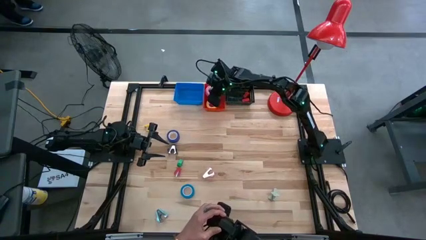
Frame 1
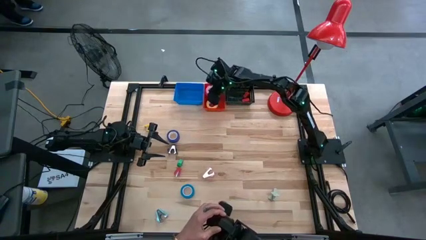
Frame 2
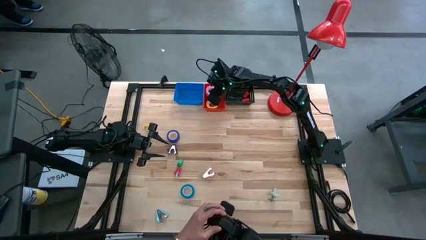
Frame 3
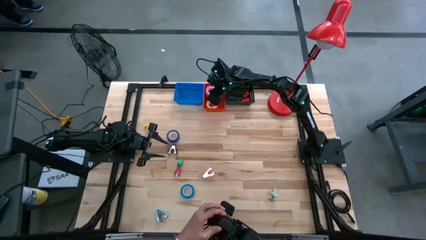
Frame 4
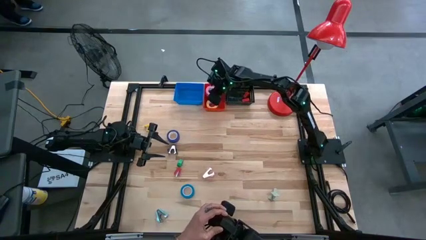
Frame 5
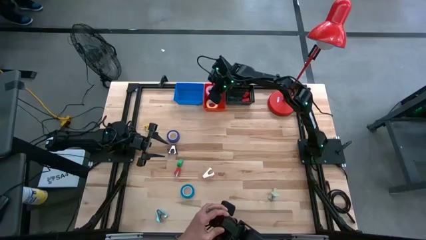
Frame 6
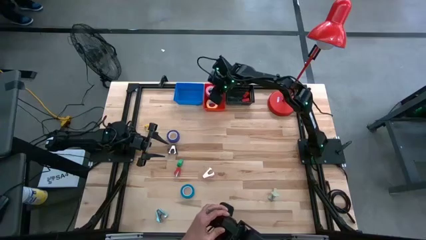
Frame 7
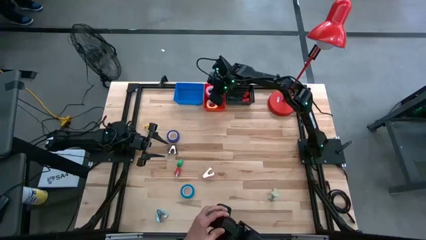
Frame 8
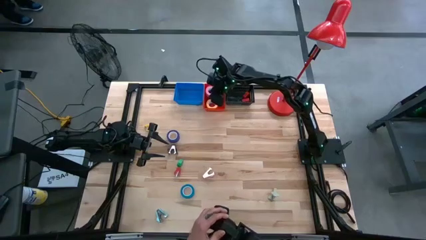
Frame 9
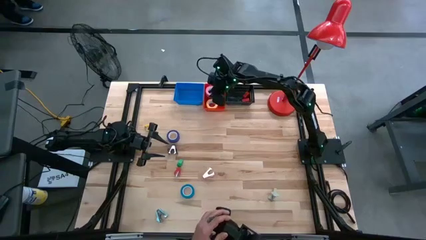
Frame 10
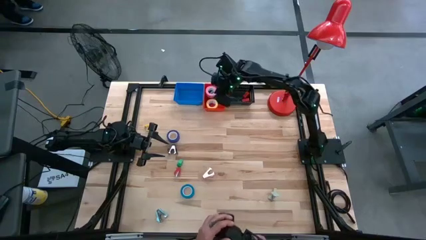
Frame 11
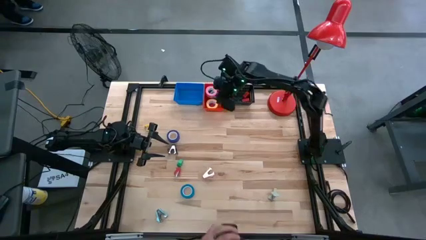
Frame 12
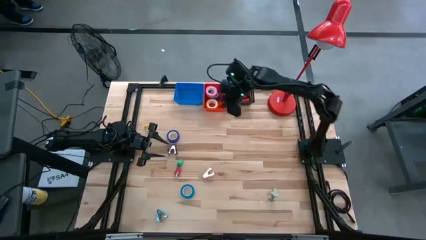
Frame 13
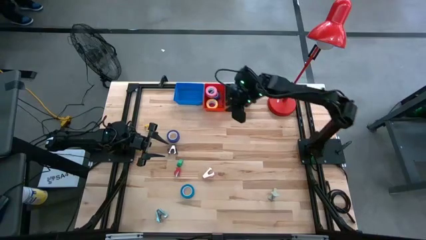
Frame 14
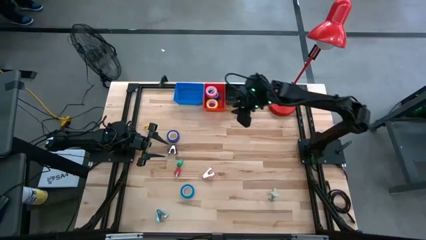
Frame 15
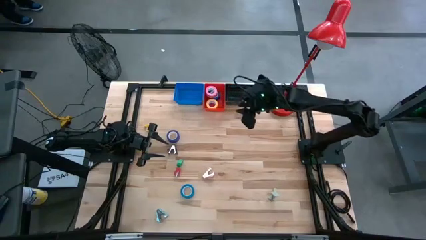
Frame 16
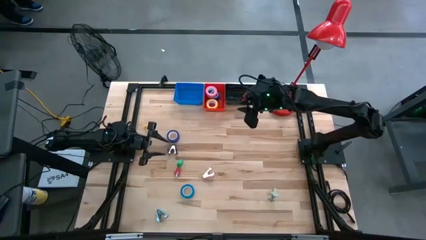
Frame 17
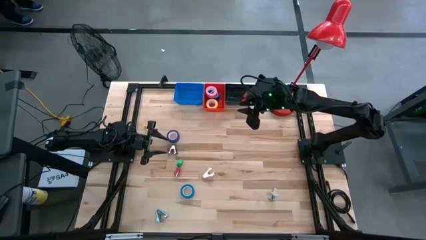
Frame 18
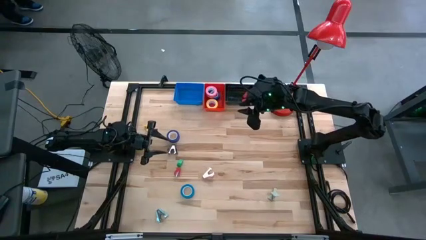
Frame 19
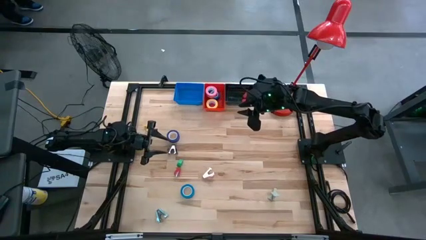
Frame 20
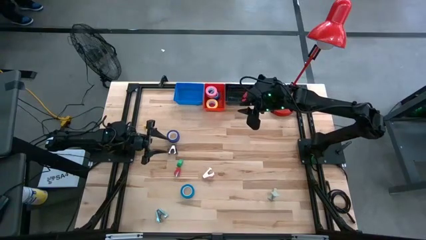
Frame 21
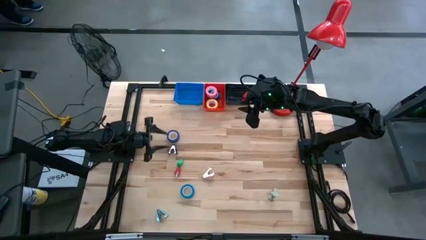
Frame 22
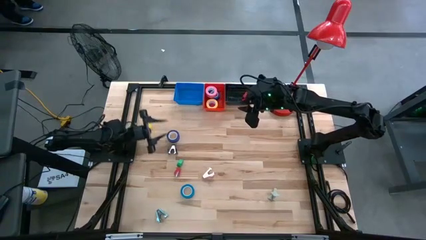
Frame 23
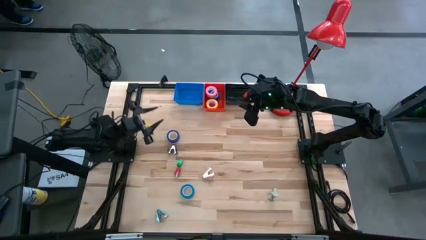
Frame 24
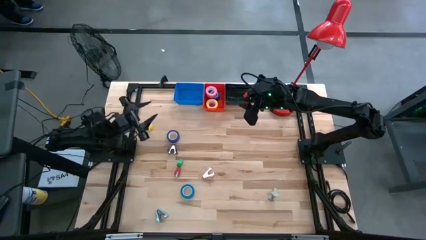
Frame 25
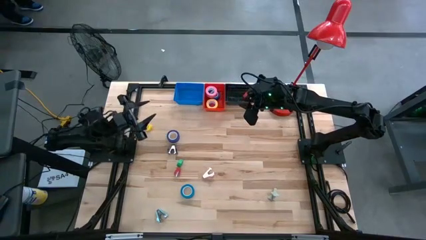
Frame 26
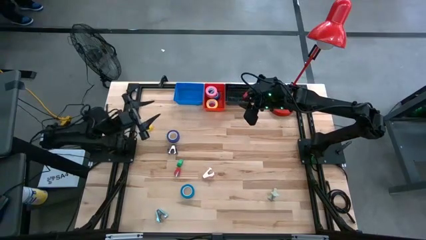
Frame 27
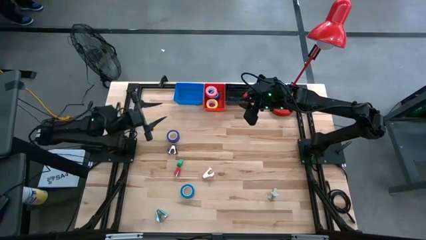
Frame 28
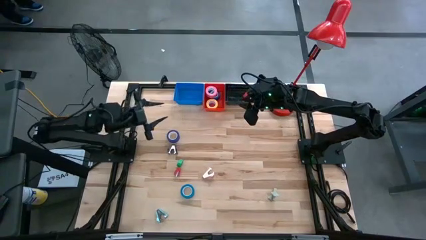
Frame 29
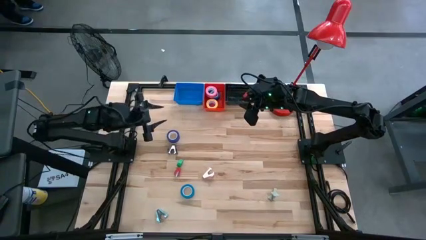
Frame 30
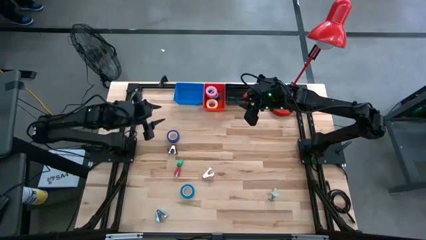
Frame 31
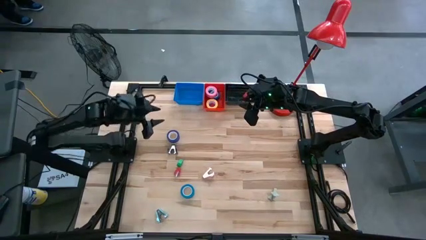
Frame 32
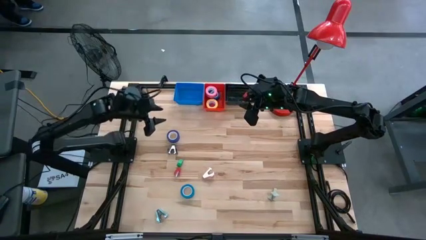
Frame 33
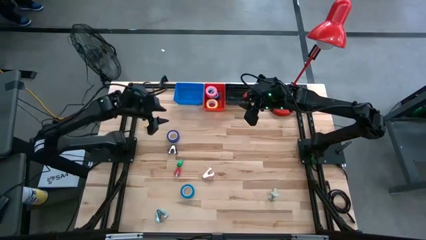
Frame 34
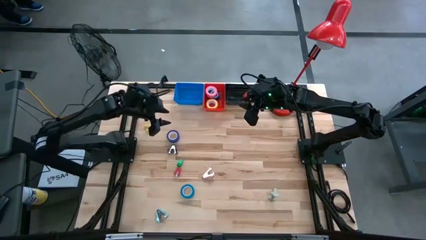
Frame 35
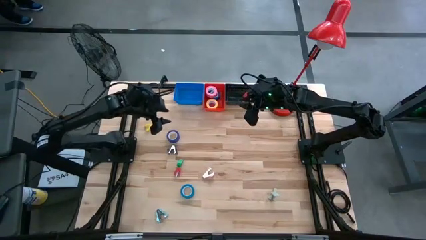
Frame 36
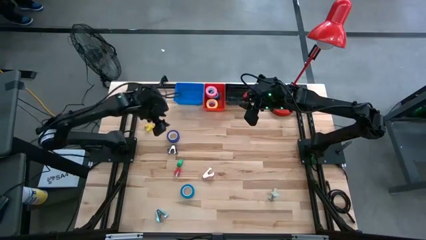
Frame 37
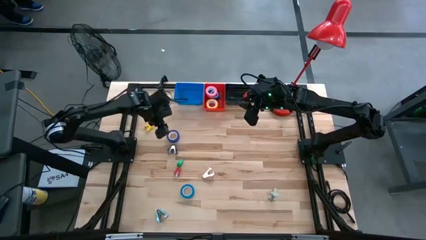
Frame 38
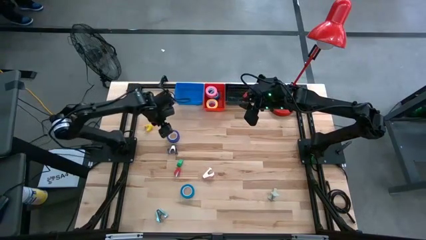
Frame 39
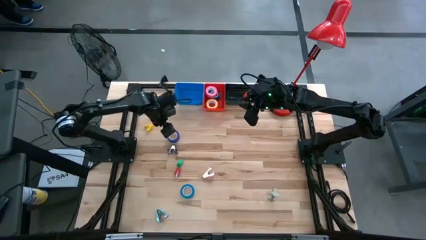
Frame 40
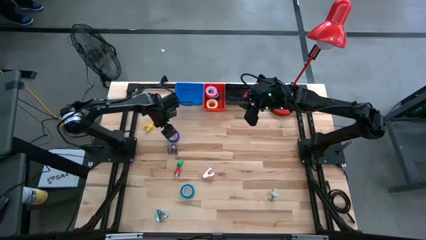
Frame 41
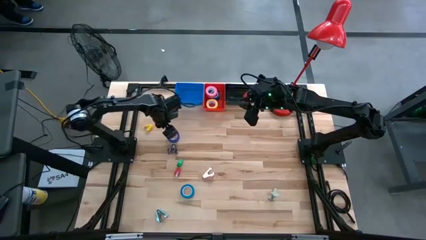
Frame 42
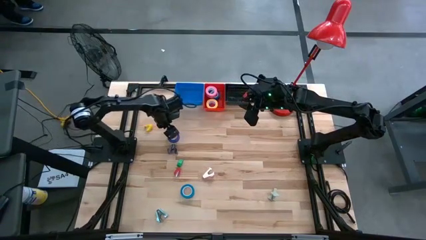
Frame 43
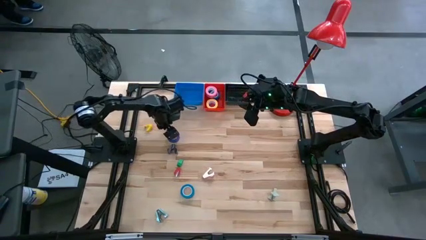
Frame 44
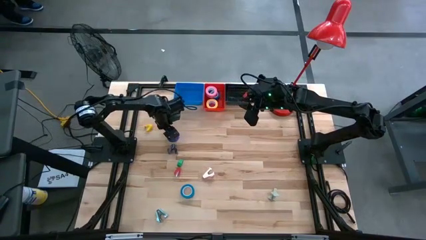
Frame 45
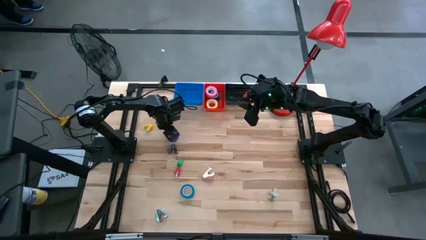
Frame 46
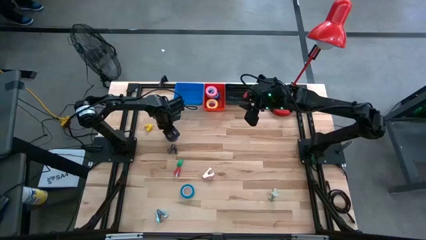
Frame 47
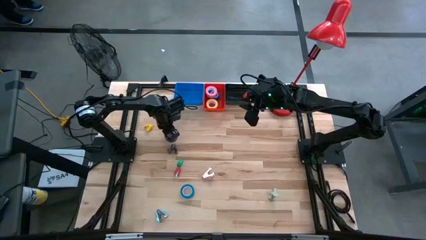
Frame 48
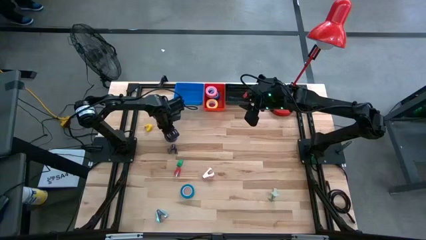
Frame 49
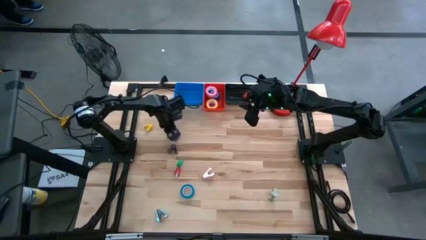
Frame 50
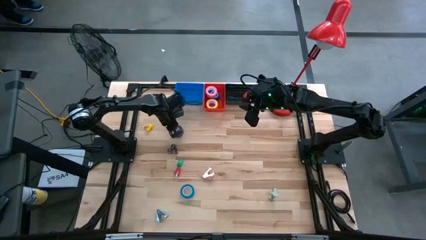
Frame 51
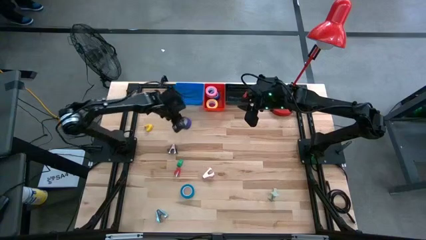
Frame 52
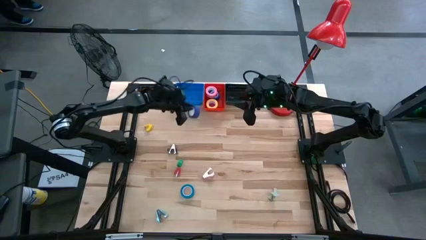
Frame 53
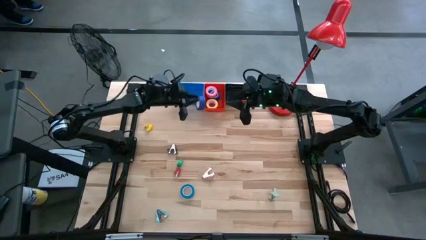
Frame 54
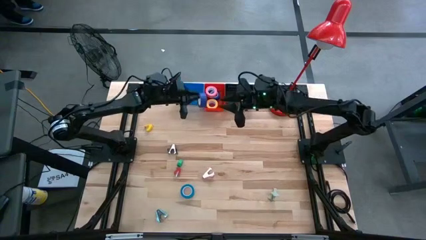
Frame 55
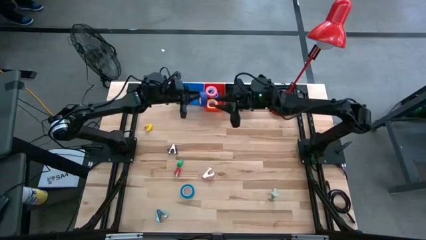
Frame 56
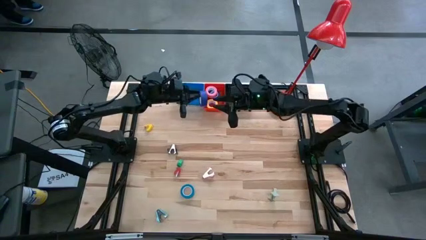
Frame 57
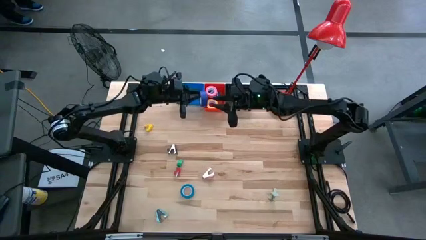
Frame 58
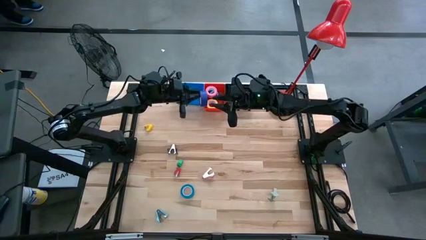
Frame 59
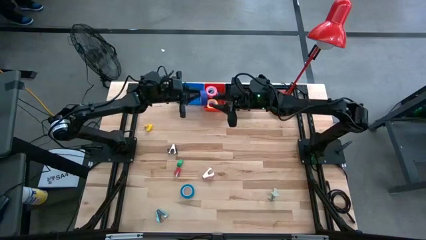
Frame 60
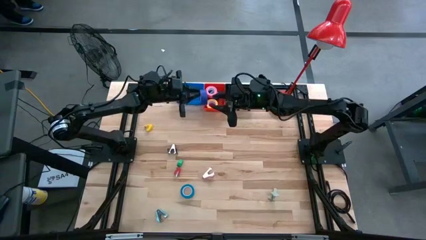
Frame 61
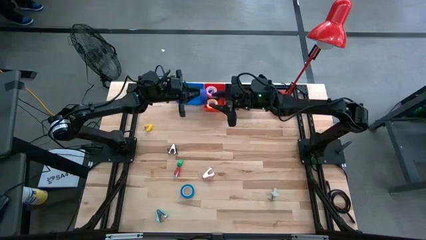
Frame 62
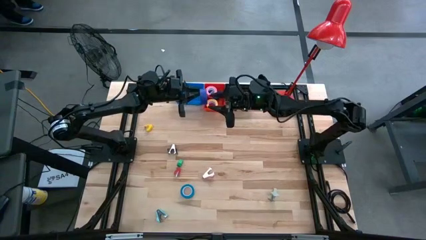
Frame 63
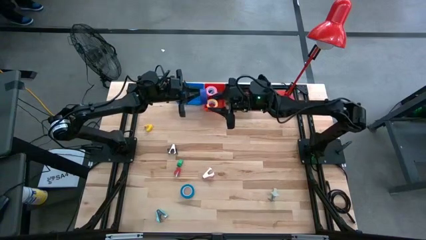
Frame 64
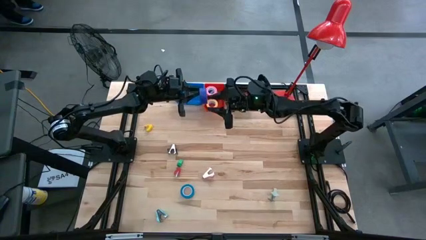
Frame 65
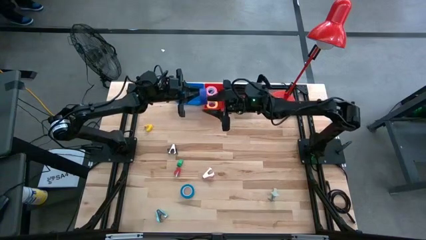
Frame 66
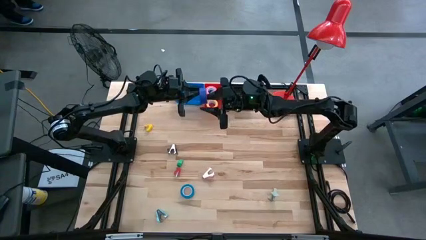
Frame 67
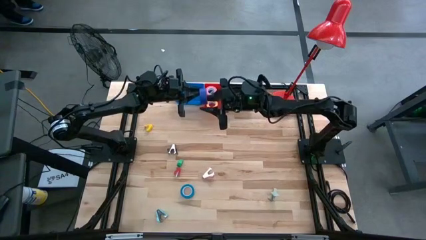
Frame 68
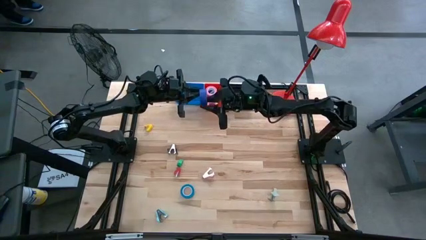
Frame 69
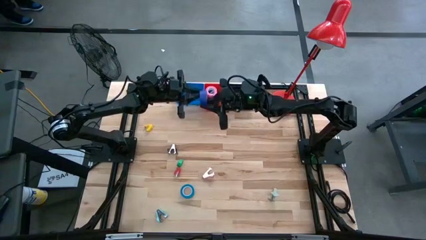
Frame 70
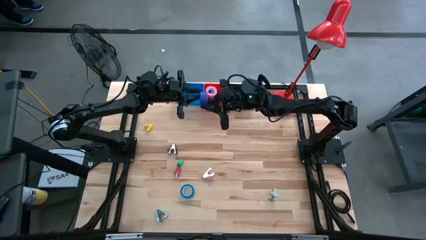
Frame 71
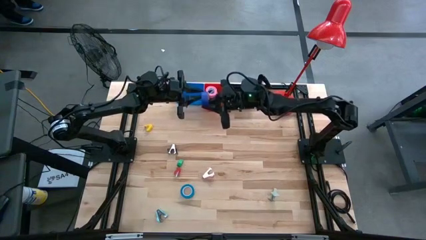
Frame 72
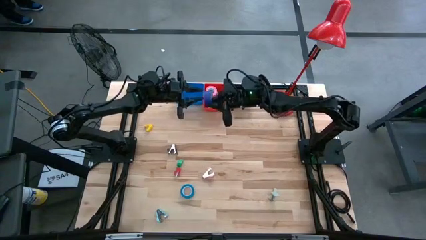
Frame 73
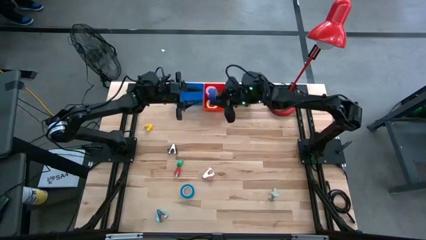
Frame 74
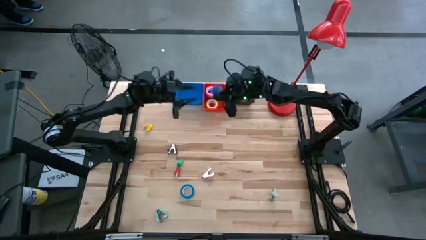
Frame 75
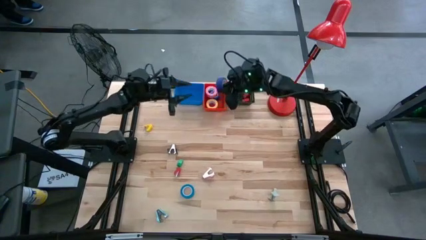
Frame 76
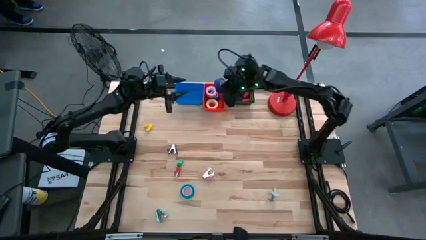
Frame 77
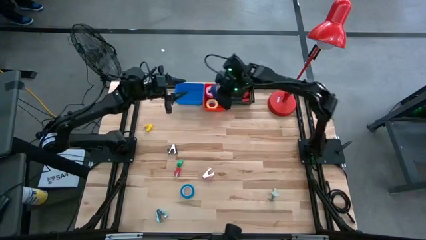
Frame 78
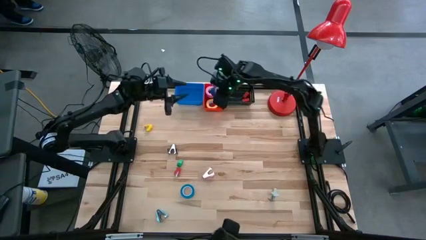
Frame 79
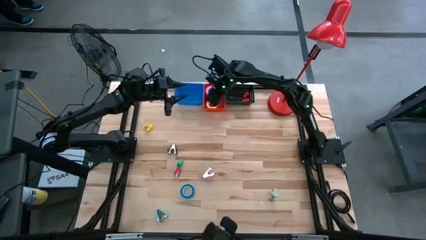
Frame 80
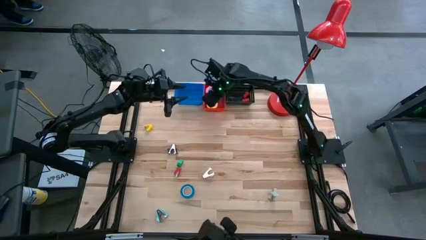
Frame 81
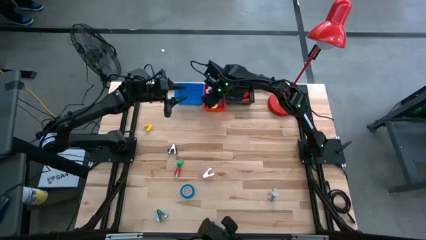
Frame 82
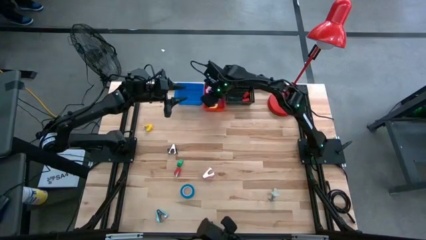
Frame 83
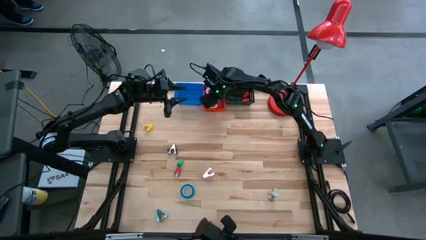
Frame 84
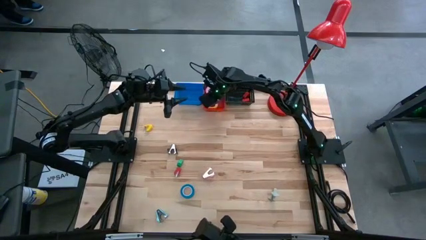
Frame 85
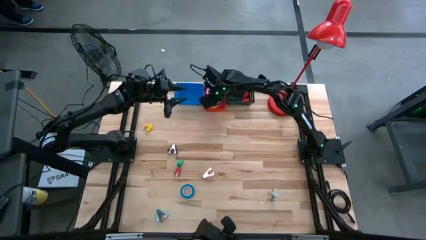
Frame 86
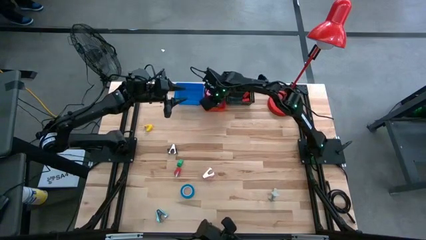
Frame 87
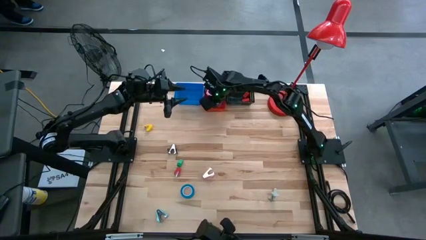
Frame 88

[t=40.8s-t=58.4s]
Task: Pick and place Stapler, Stapler remover, tape
Put the blue tape into the red basket
